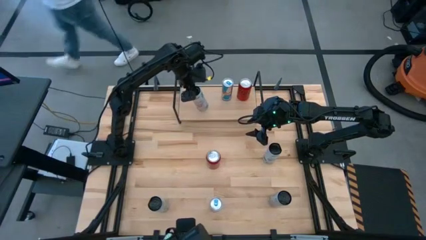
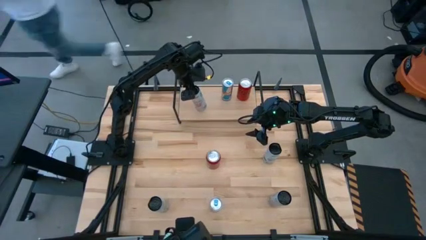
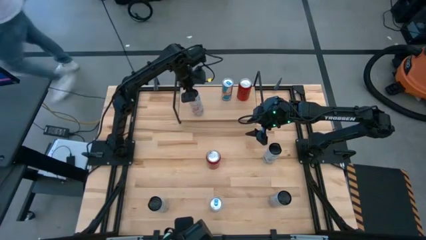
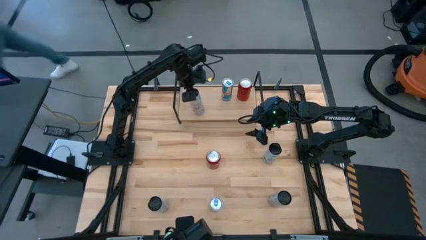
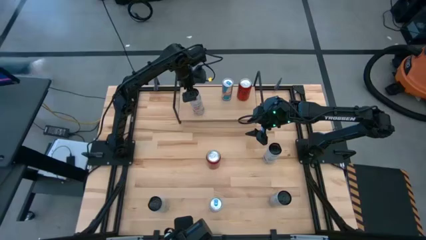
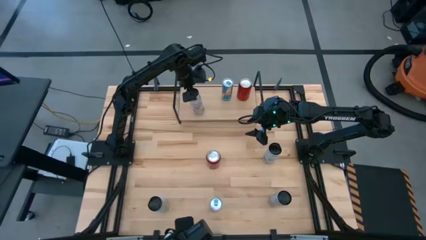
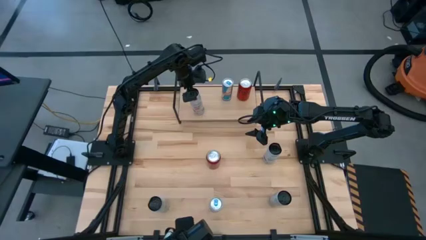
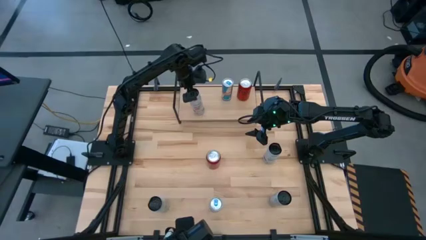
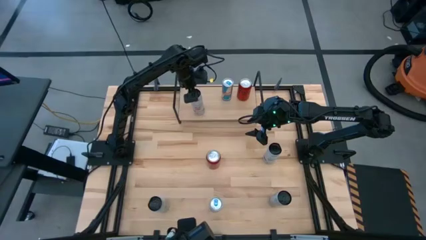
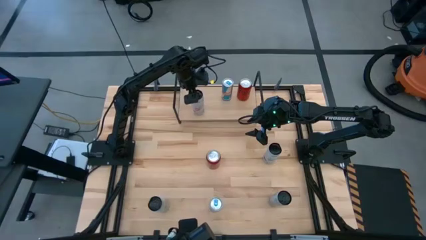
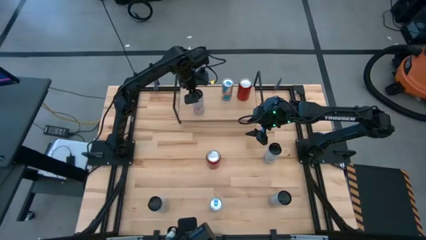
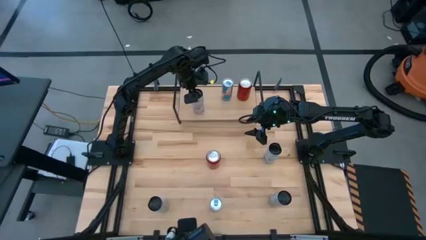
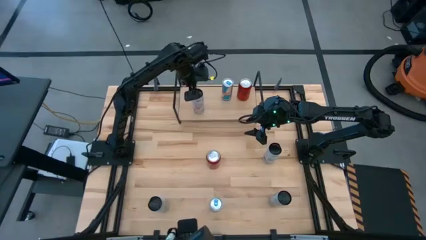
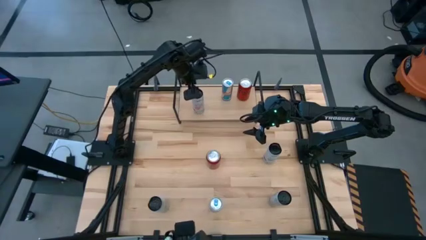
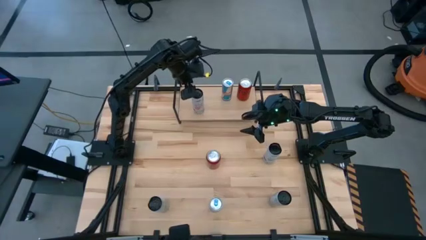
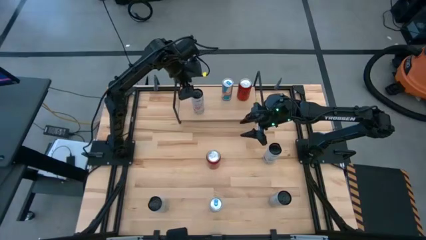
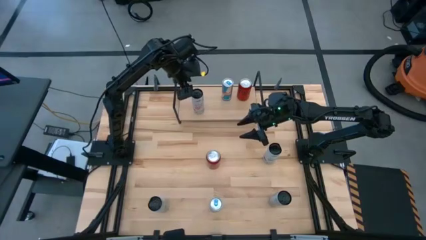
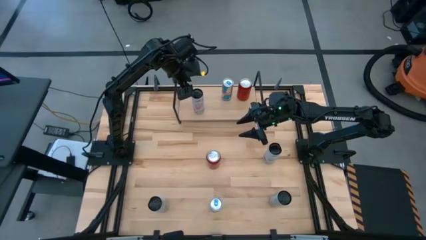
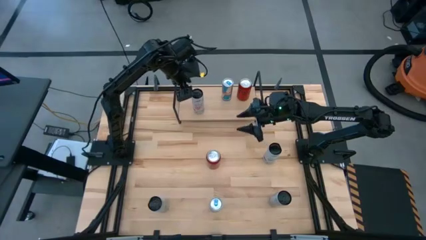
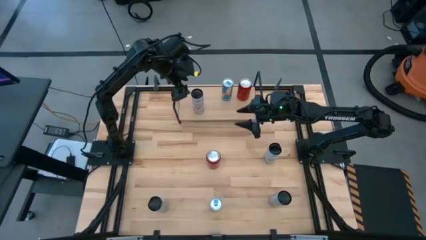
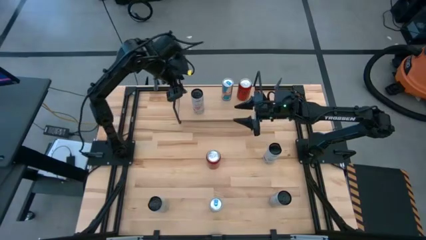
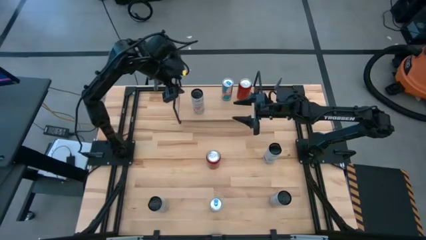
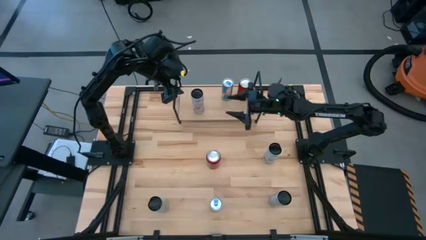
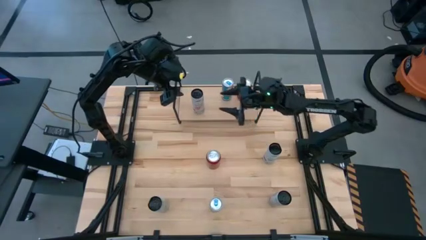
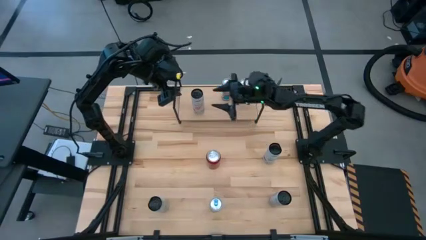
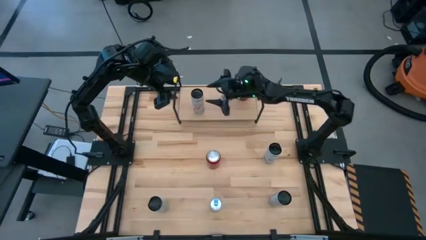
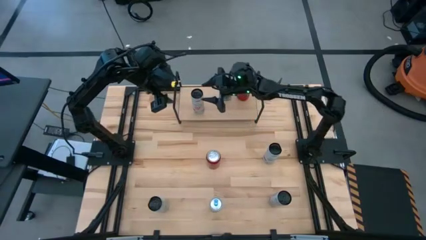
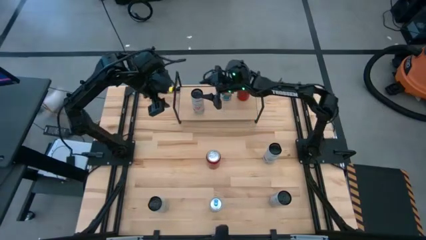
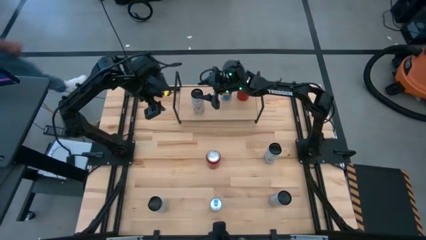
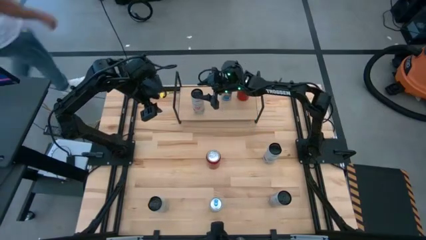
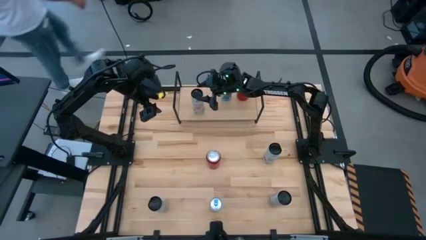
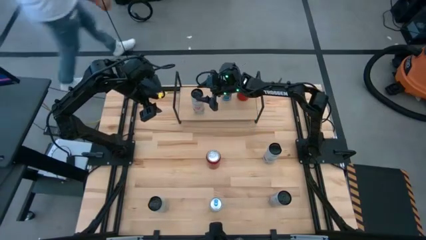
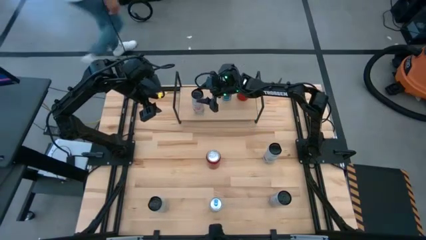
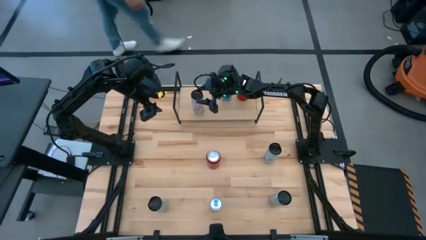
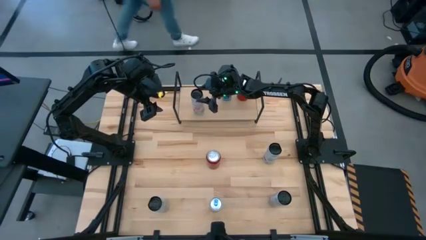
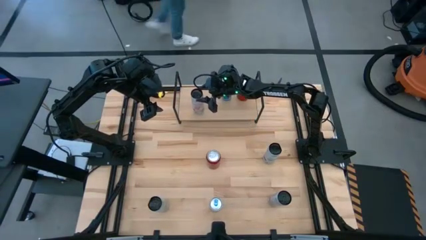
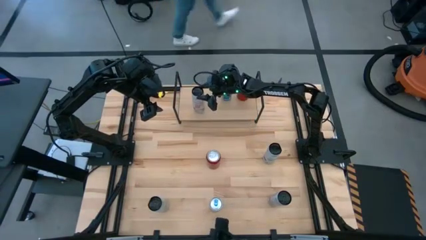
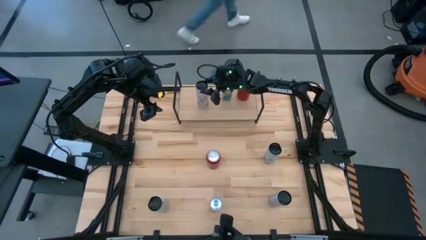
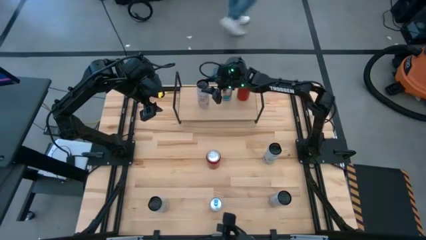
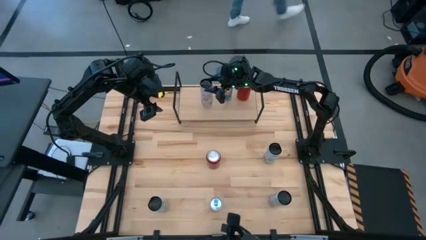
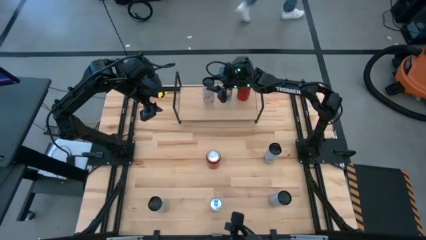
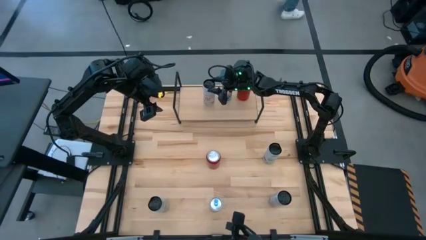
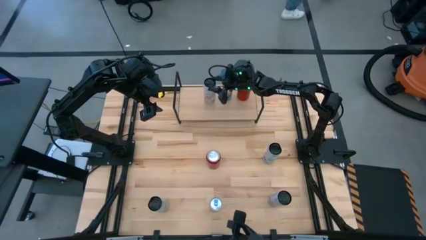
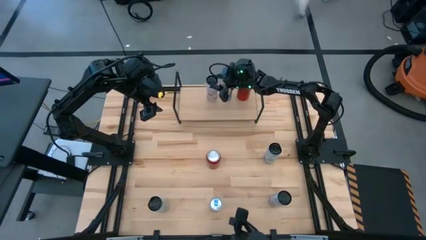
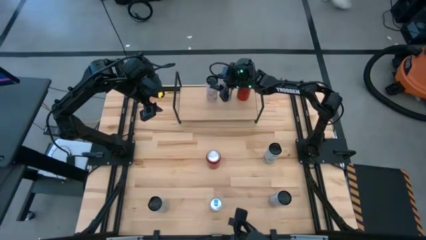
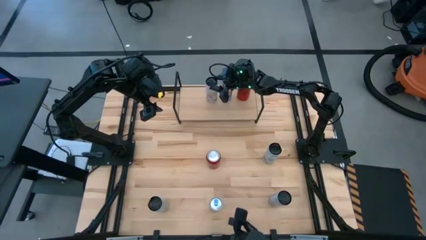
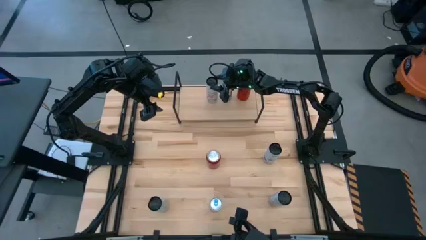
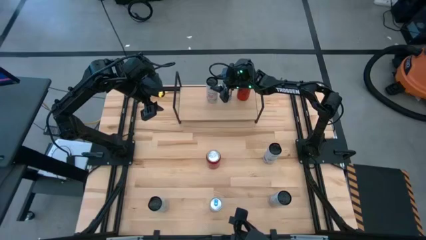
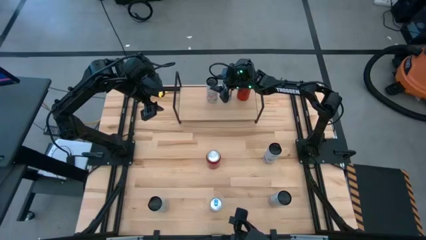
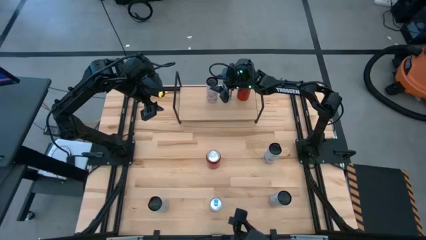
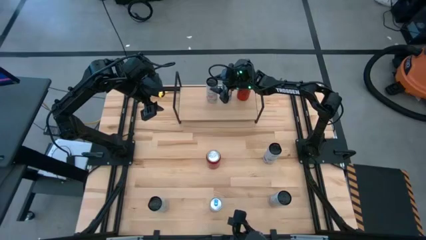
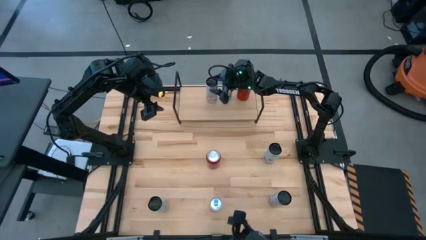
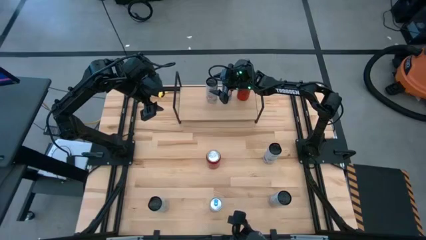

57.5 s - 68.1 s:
Task: Place canned beverage on shelf
Put the top white and pink soda can on the shelf

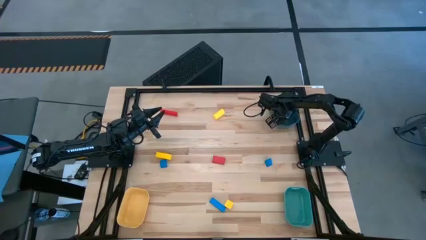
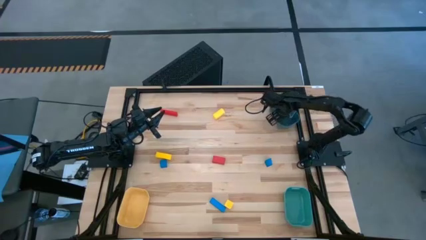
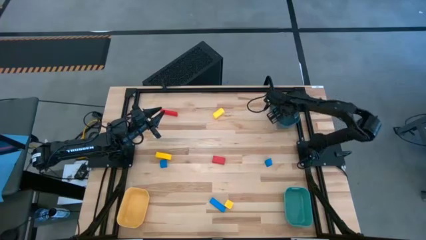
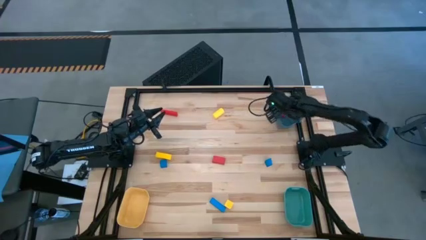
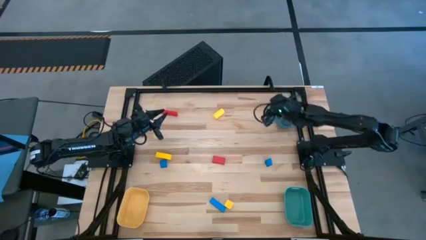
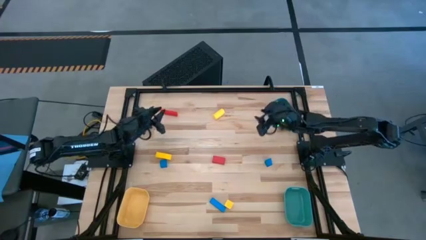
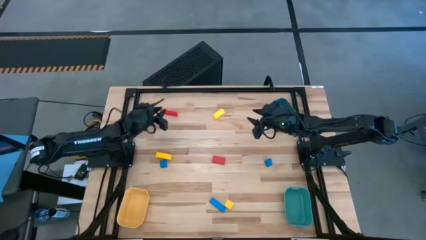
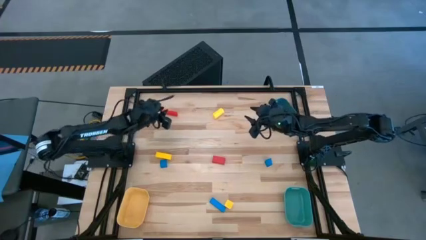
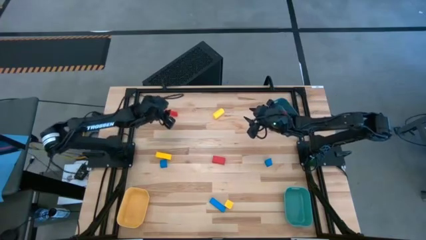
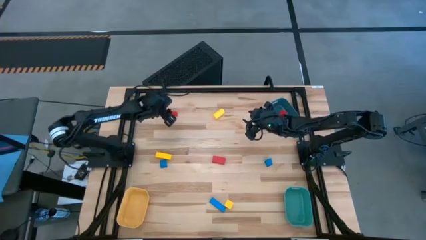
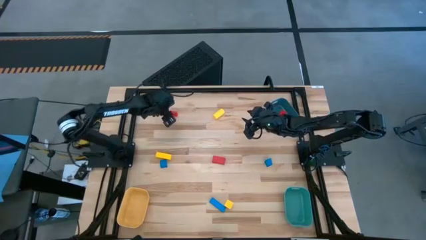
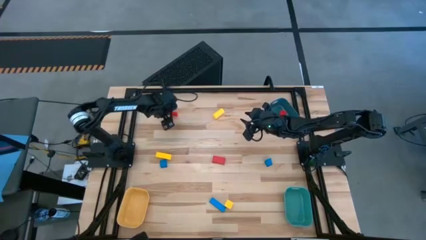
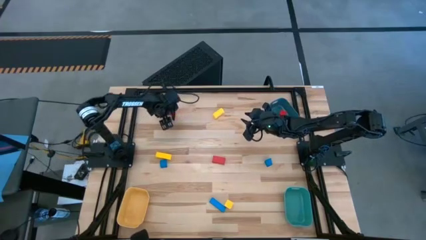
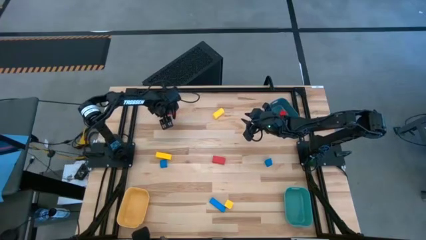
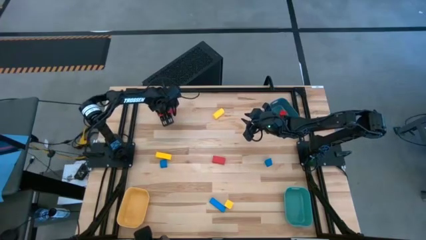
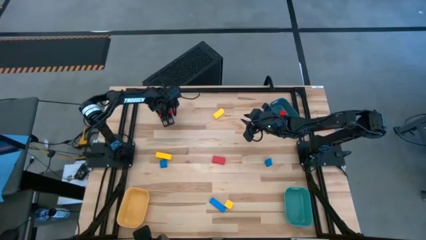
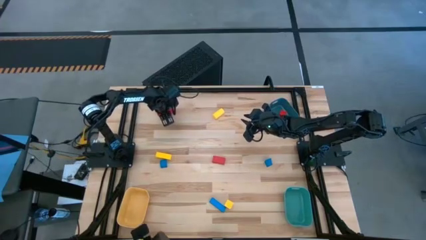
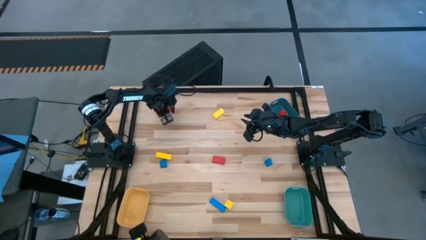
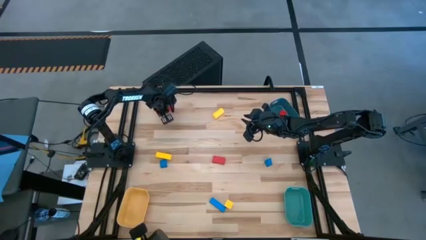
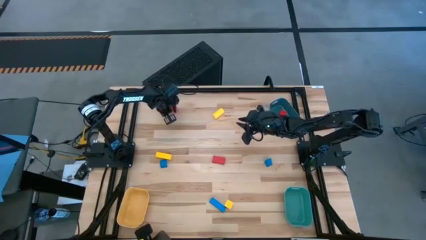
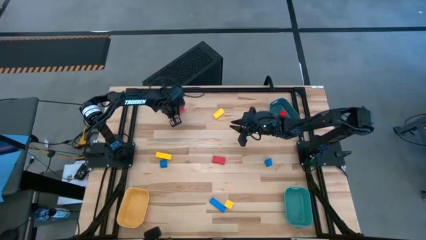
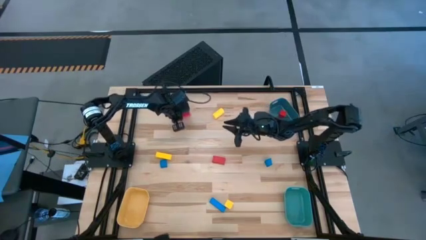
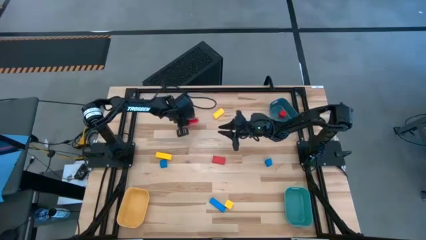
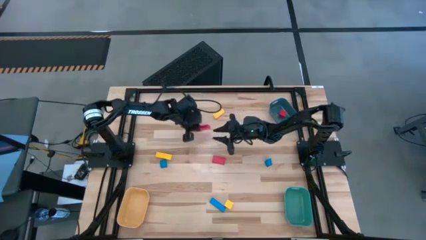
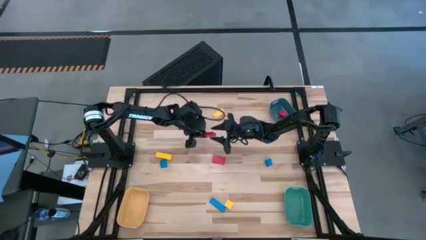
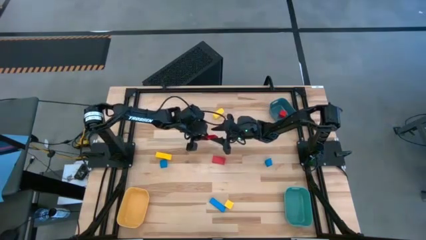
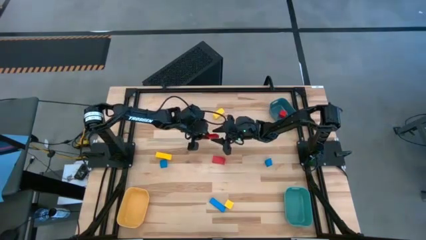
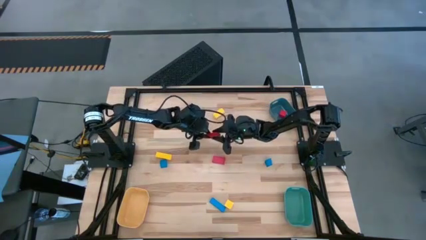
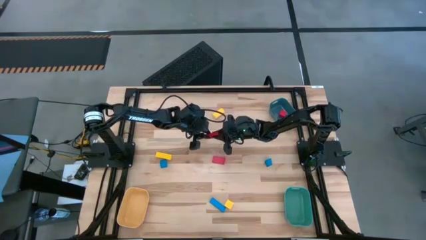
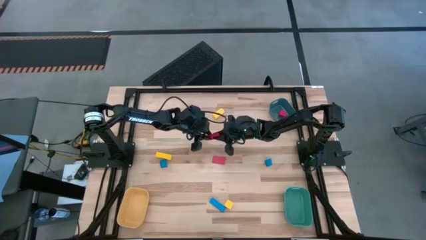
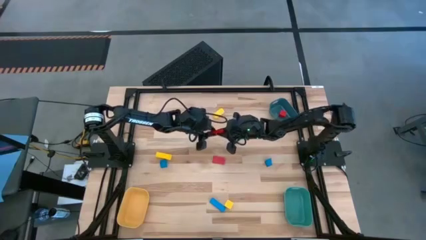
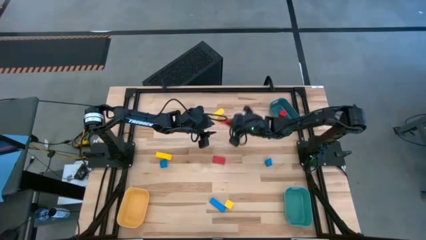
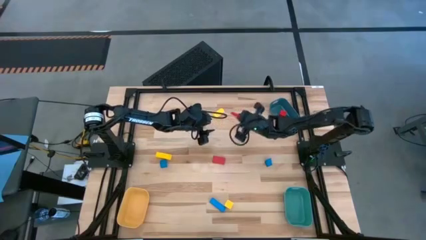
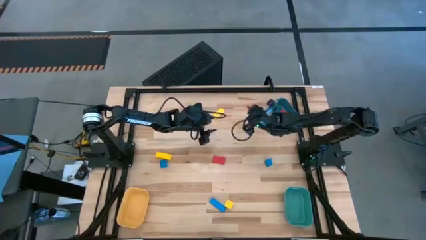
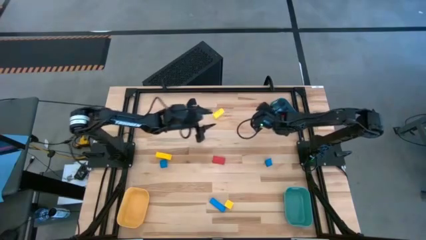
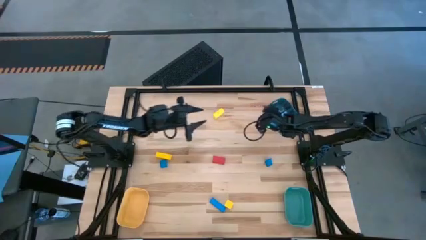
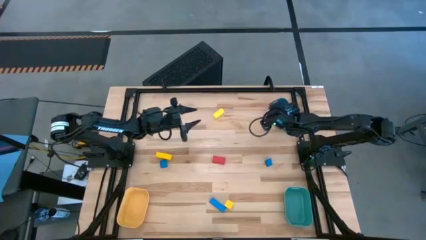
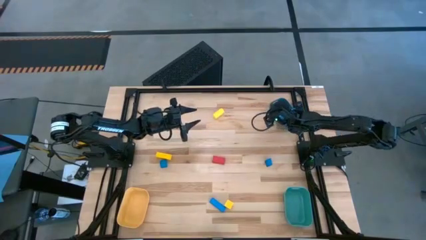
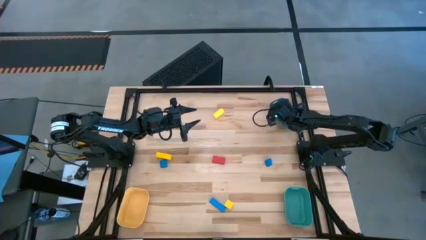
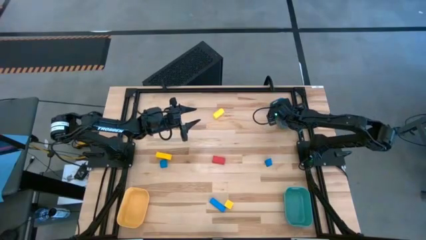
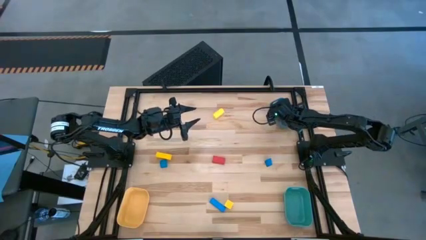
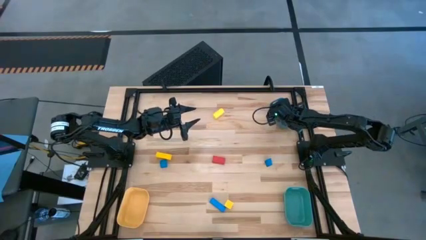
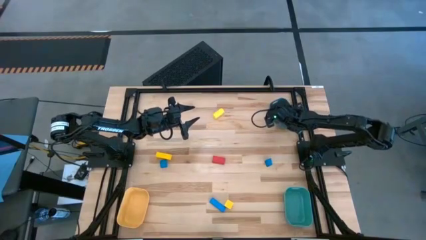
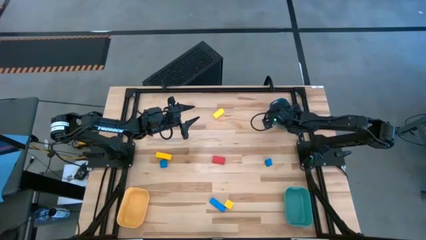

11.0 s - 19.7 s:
Task: Sort & place blocks by color
Put the top red block into the blue bin
